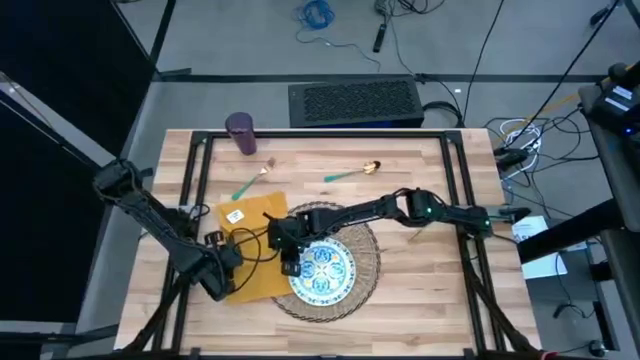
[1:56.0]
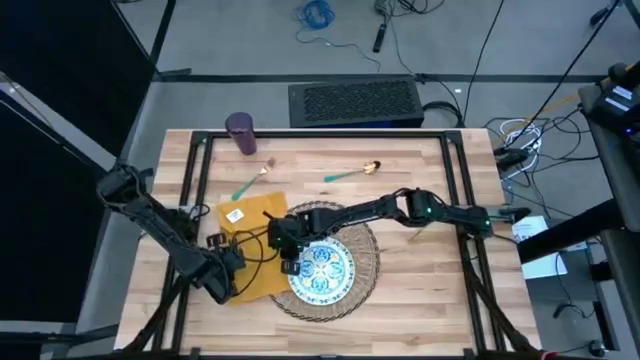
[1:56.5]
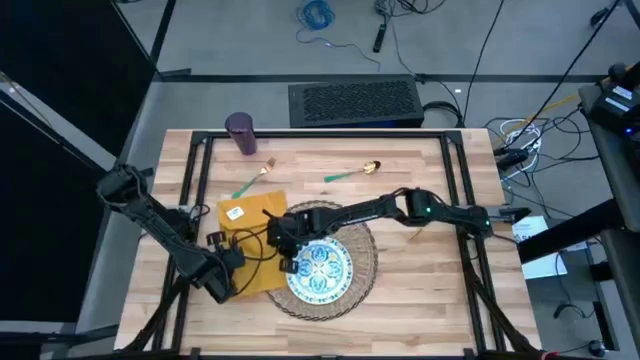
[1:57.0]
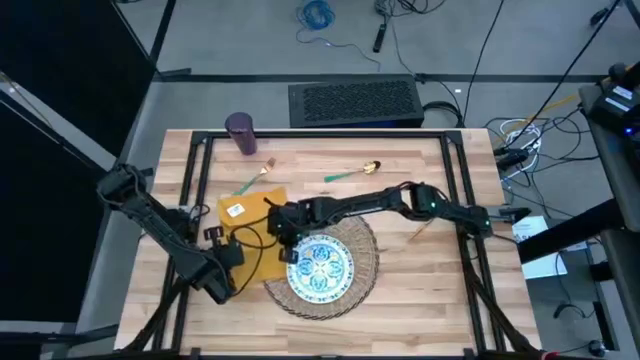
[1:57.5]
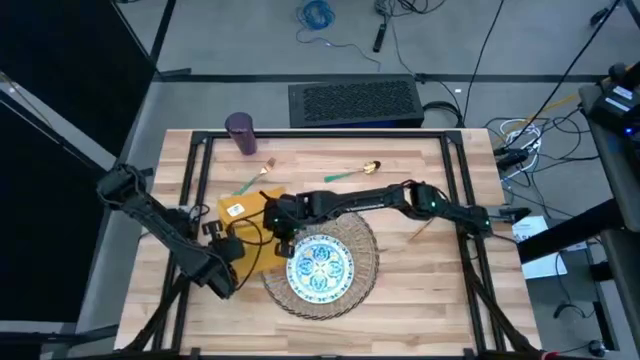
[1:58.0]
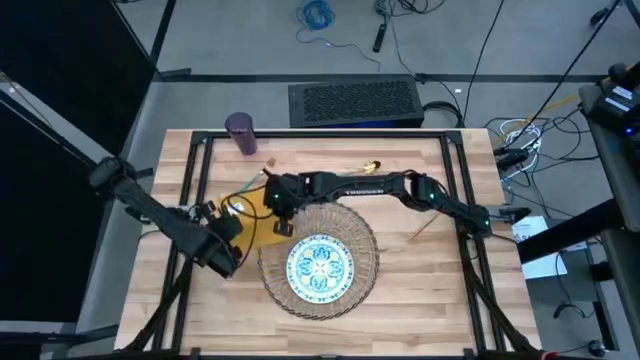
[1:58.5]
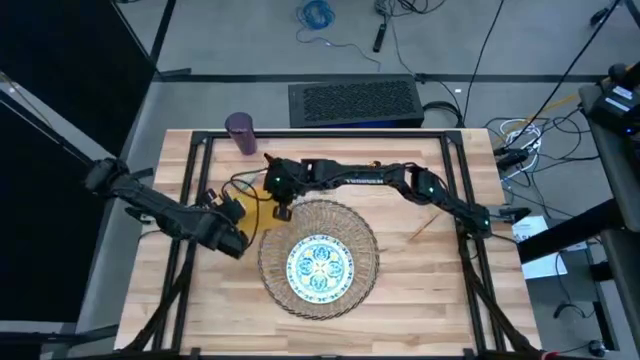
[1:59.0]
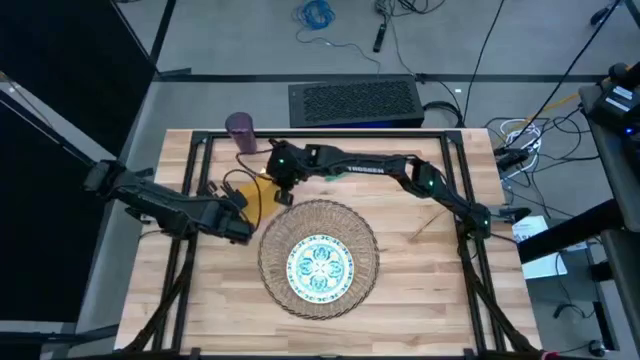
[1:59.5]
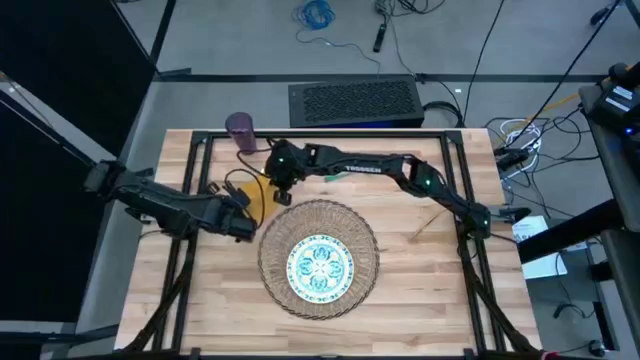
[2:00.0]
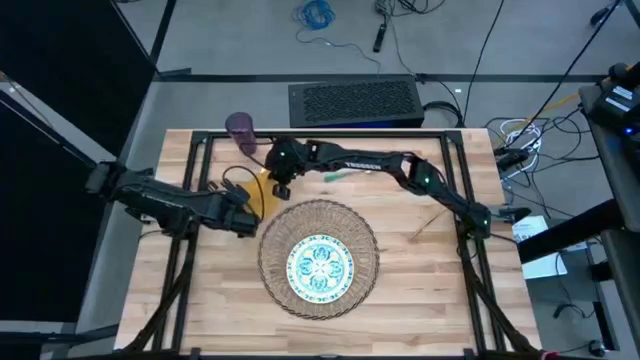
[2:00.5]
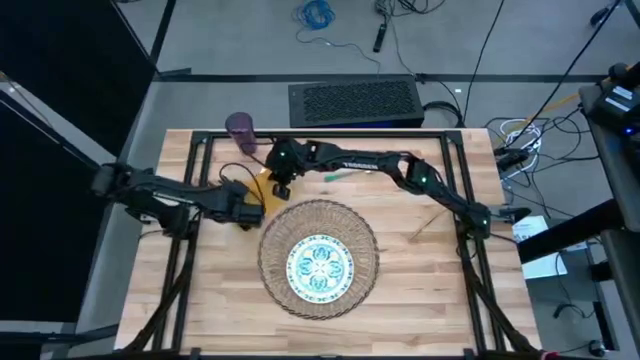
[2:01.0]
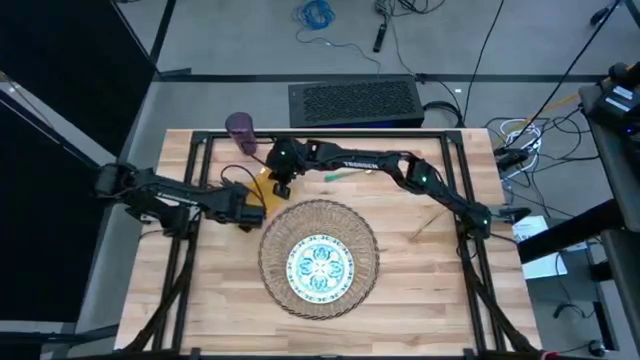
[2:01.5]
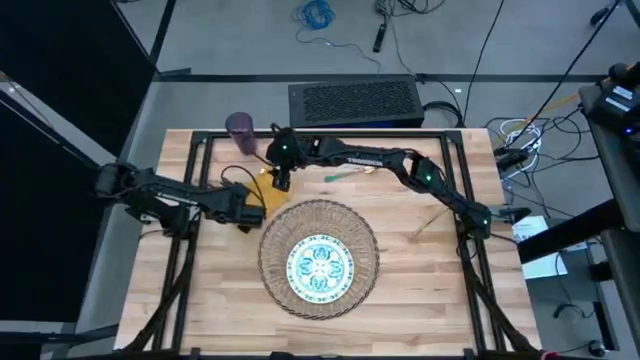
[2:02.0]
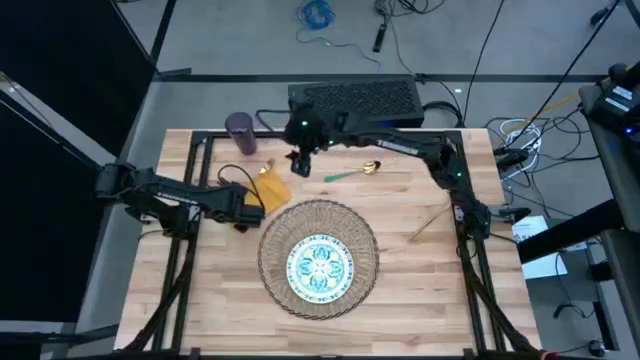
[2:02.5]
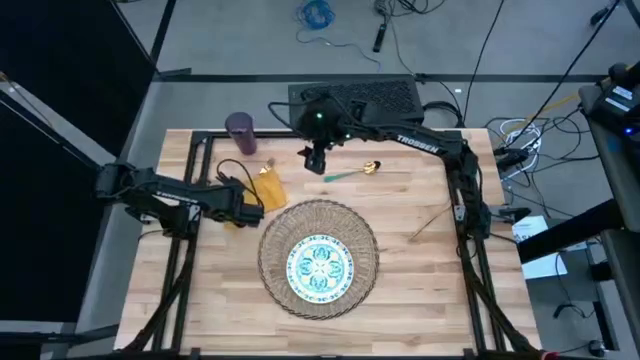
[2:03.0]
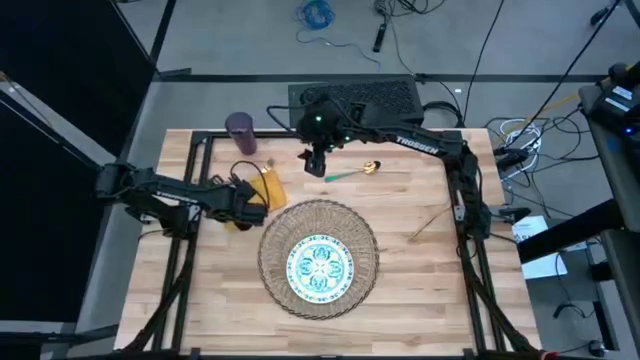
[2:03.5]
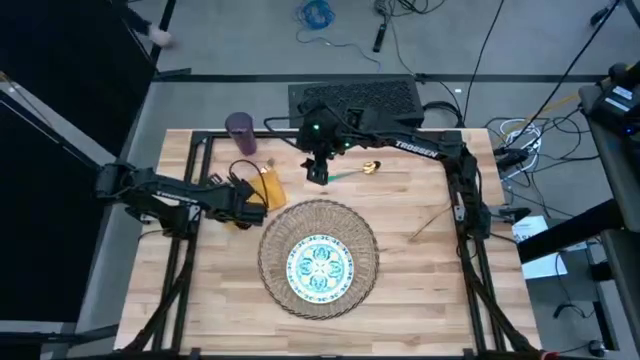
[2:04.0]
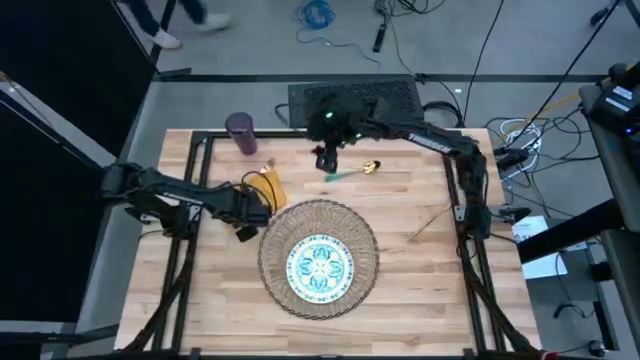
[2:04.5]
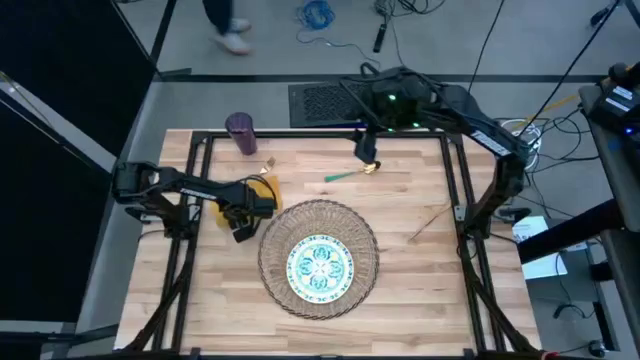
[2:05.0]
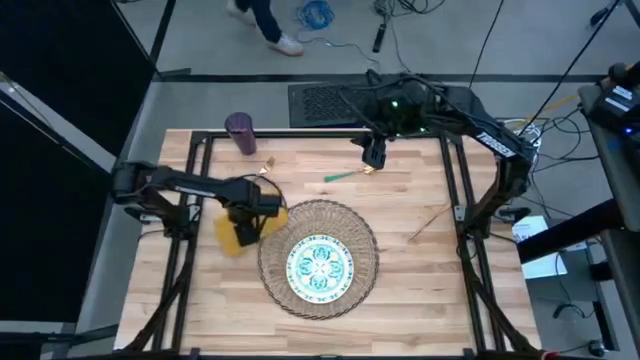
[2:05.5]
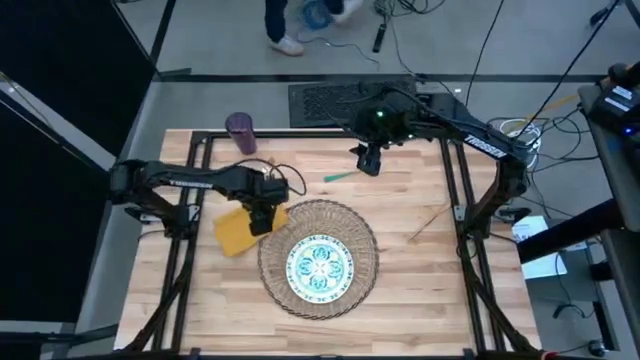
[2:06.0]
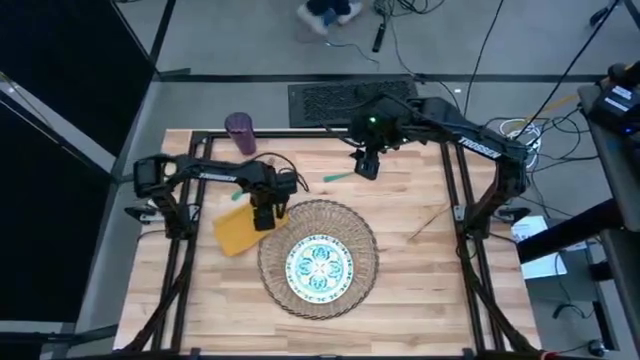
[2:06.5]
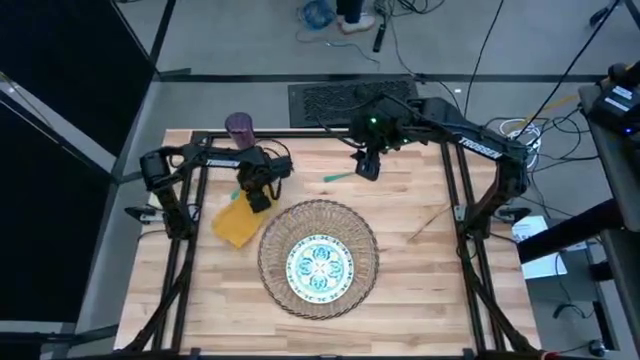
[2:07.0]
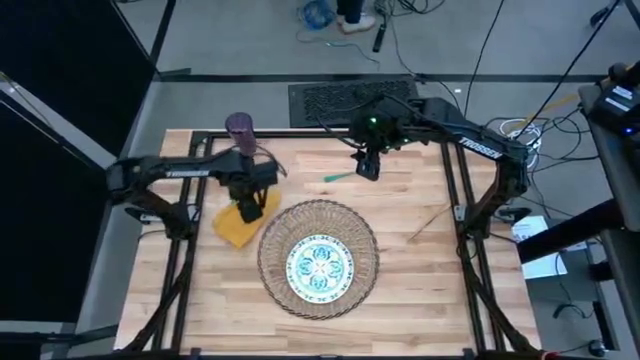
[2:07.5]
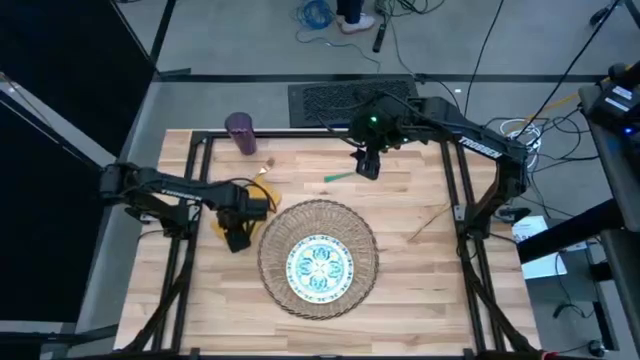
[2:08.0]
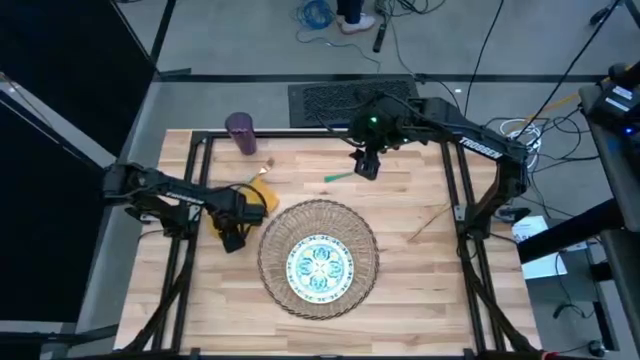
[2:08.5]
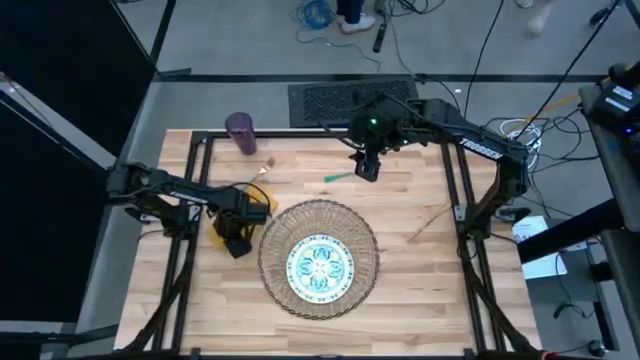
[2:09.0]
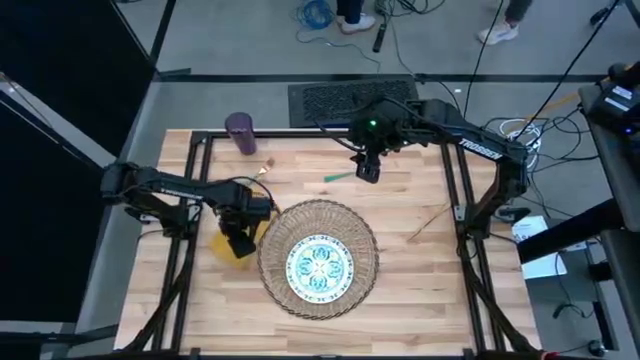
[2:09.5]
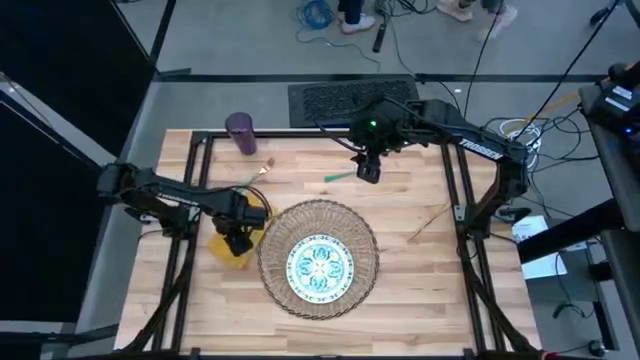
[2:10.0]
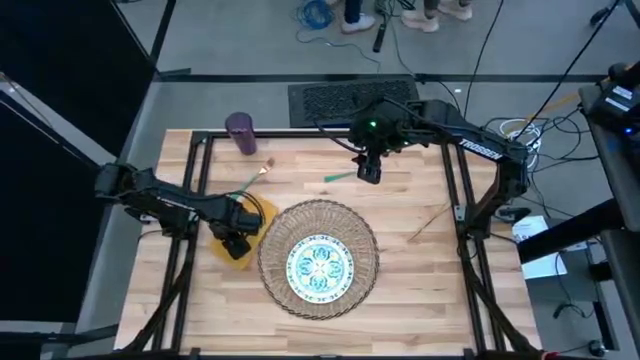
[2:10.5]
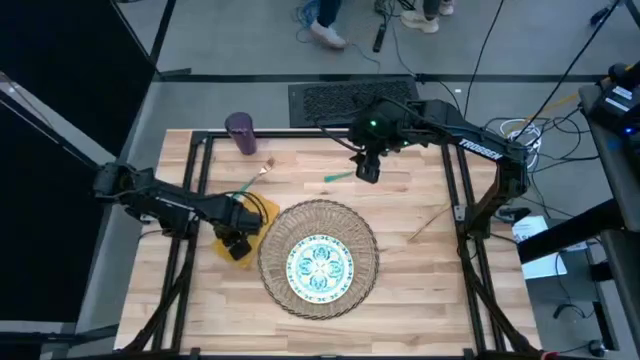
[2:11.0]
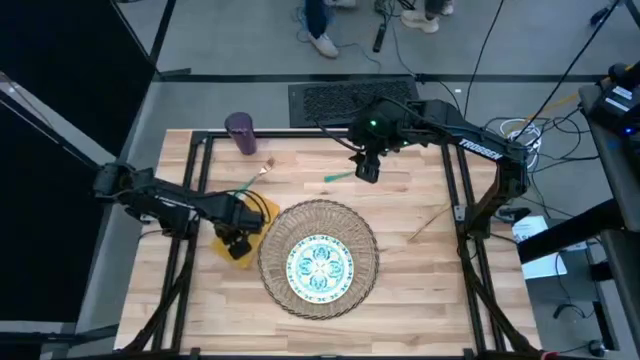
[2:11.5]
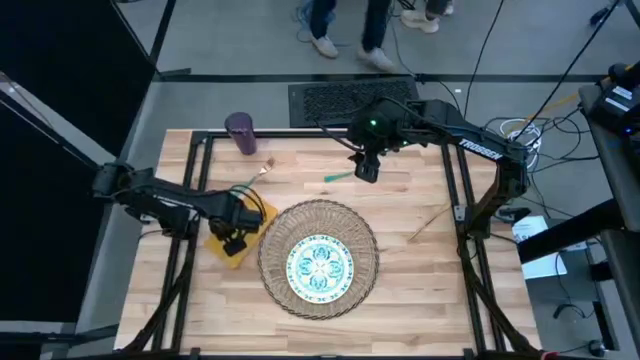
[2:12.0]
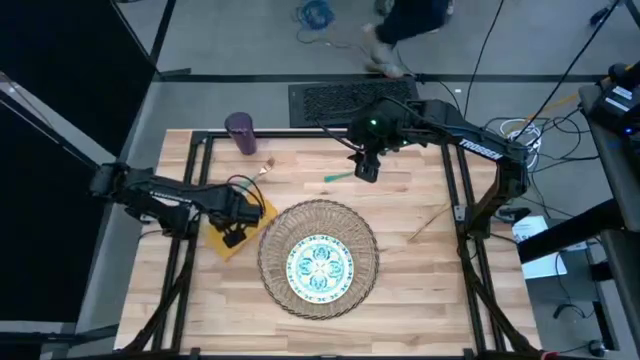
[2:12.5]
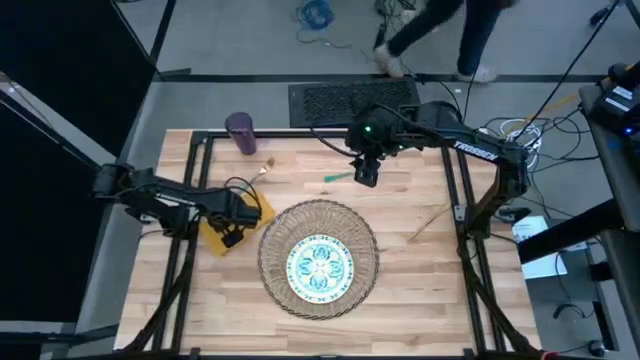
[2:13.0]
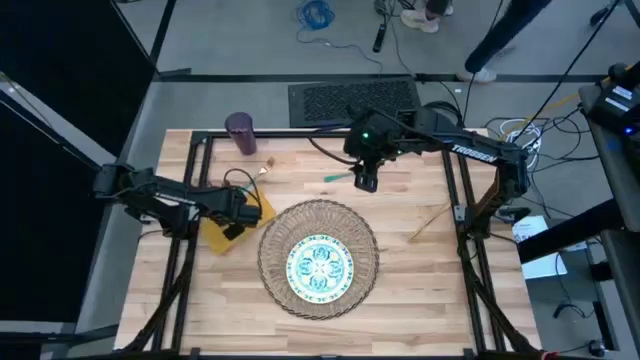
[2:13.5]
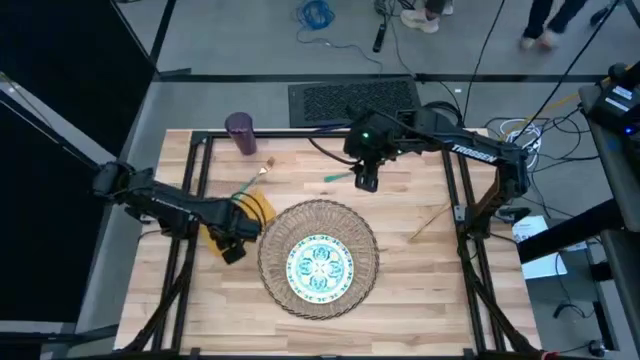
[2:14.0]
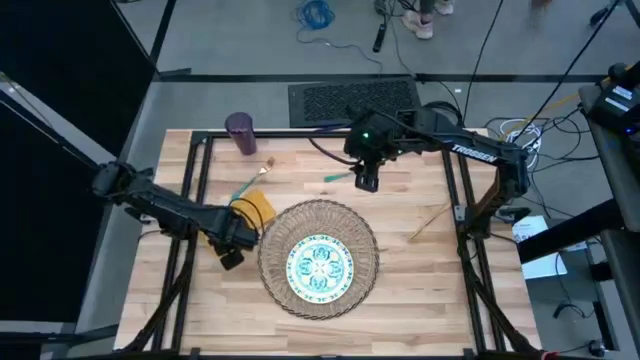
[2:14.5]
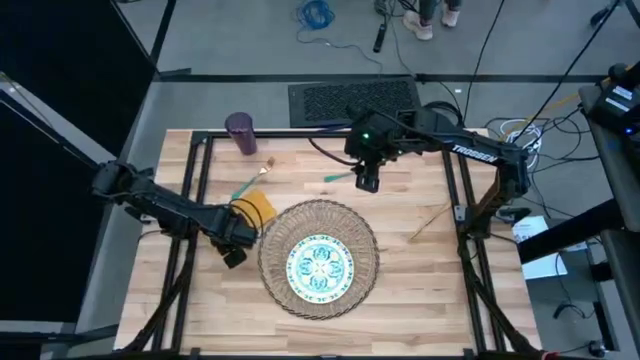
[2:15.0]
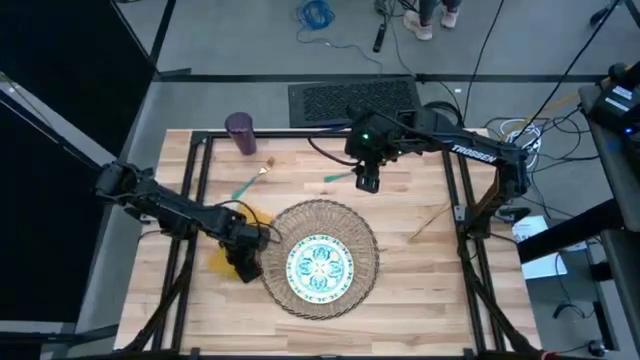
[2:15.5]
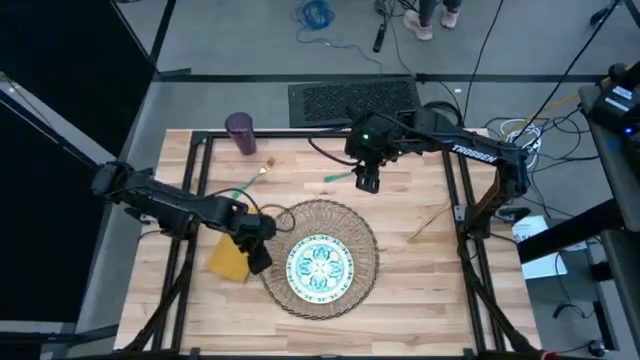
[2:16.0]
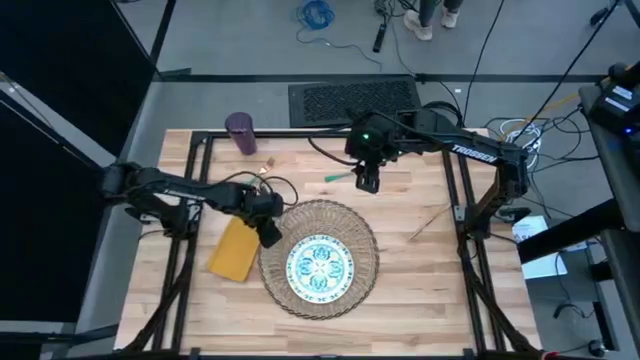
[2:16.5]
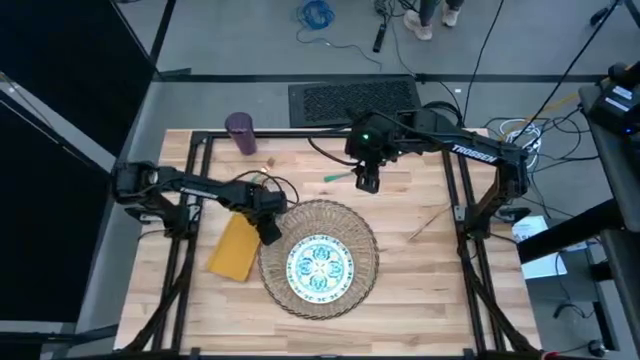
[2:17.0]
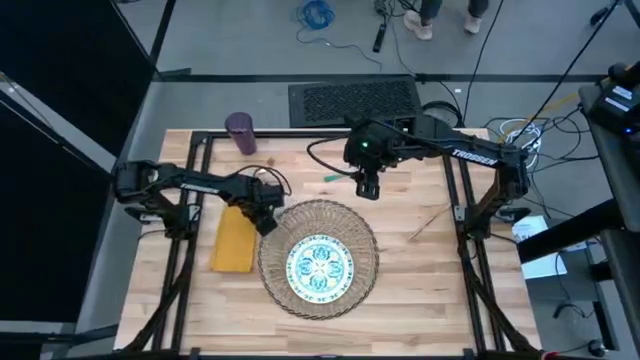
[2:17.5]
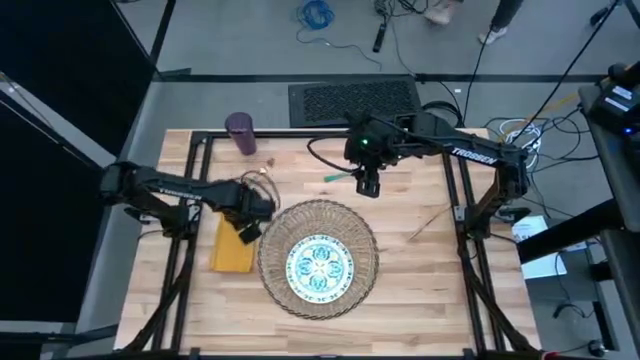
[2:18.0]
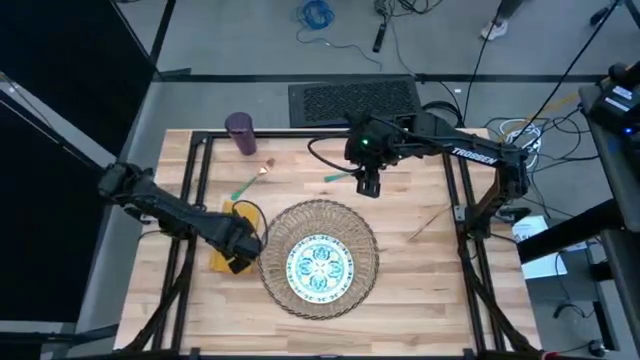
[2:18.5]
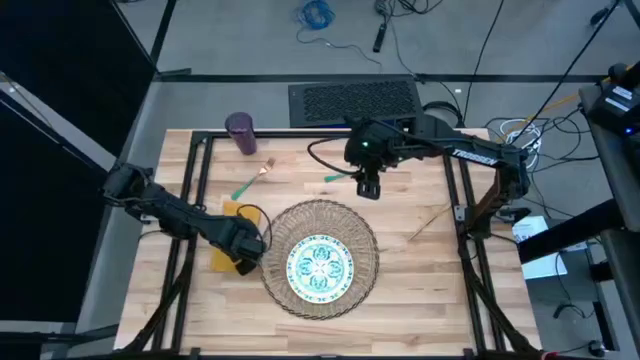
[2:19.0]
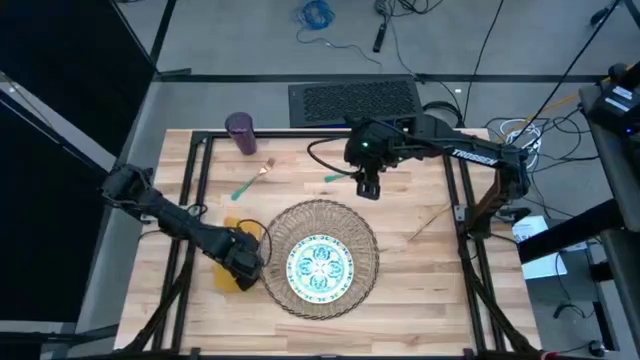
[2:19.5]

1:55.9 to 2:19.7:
Task: Set table place
Fold the yellow table napkin
